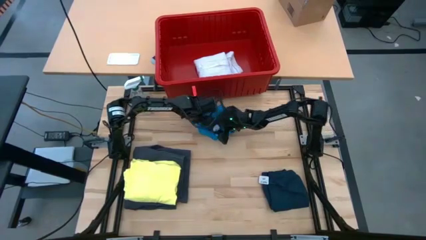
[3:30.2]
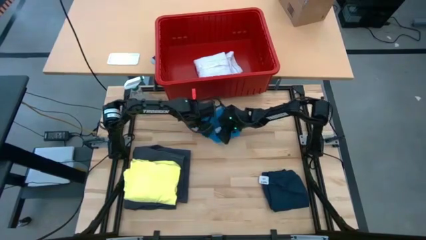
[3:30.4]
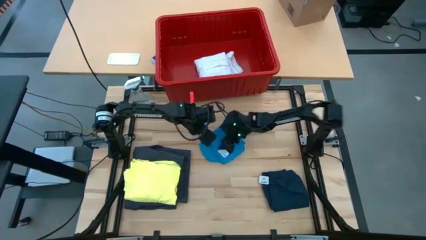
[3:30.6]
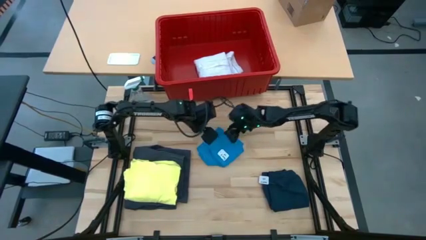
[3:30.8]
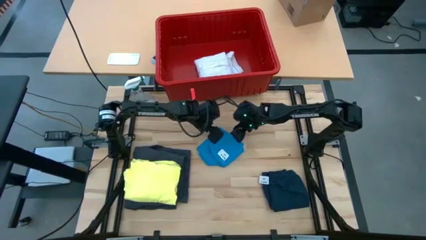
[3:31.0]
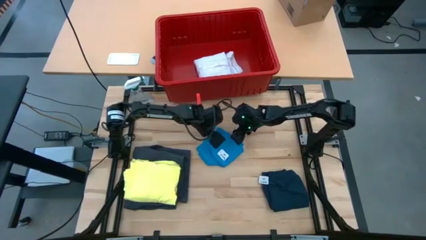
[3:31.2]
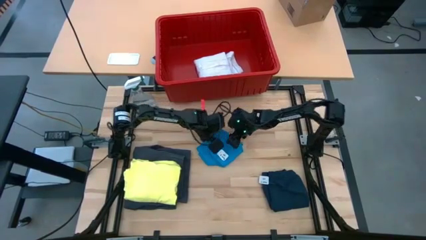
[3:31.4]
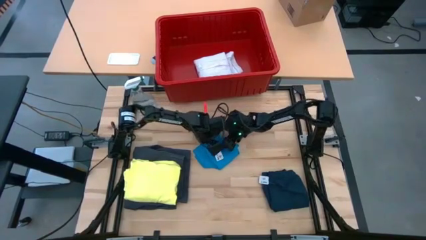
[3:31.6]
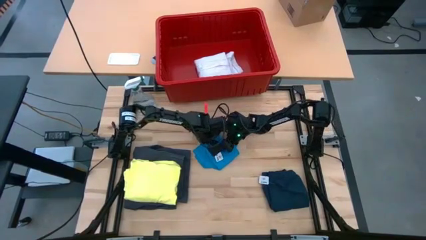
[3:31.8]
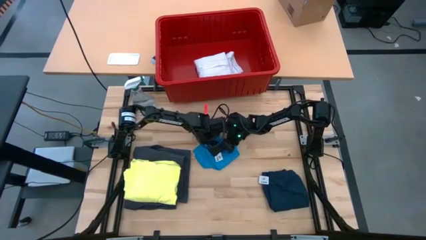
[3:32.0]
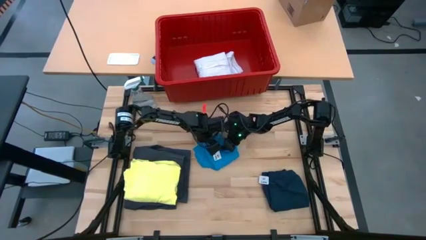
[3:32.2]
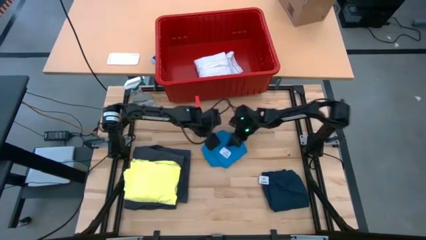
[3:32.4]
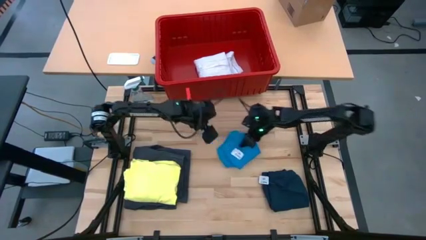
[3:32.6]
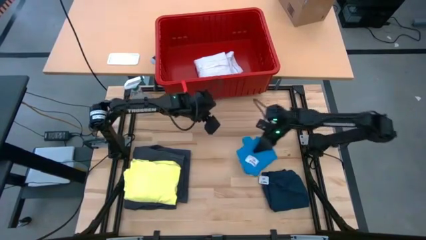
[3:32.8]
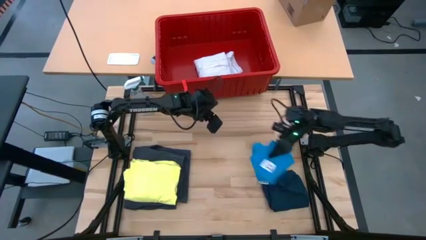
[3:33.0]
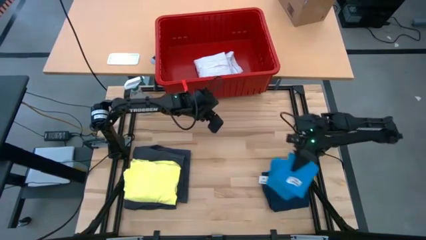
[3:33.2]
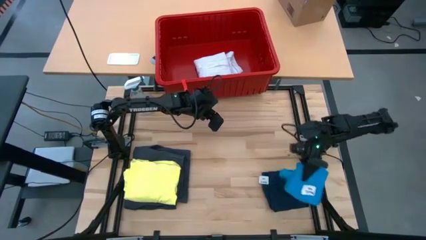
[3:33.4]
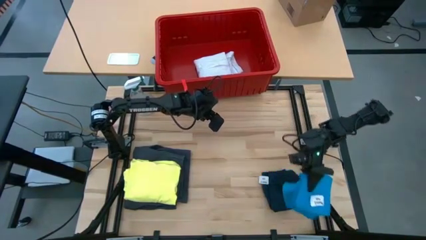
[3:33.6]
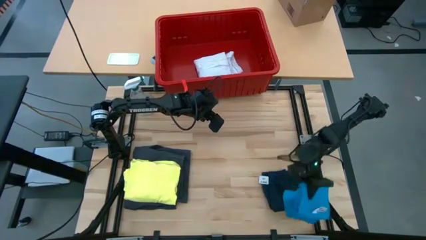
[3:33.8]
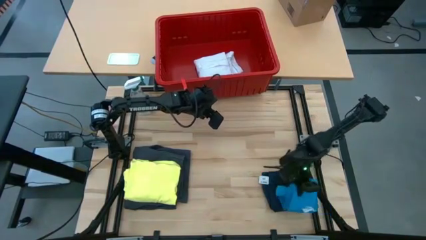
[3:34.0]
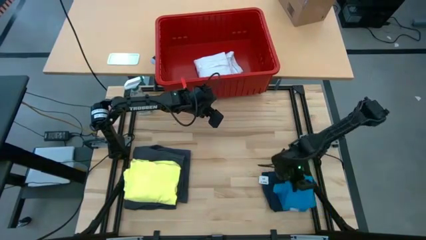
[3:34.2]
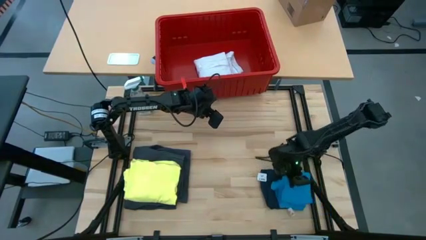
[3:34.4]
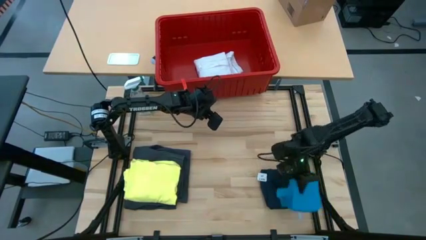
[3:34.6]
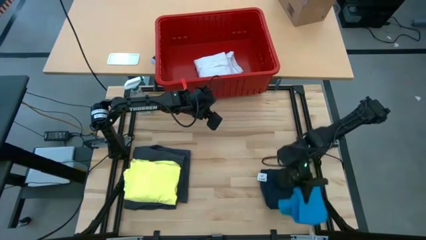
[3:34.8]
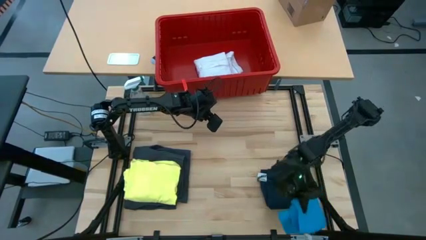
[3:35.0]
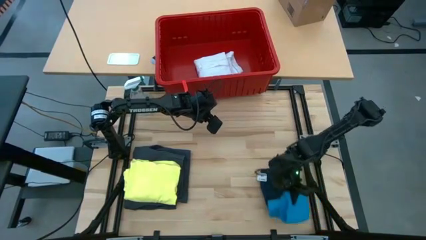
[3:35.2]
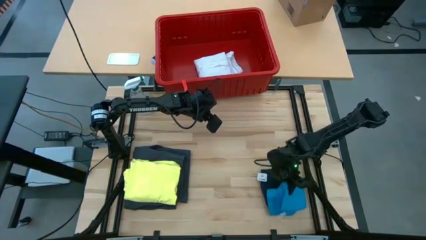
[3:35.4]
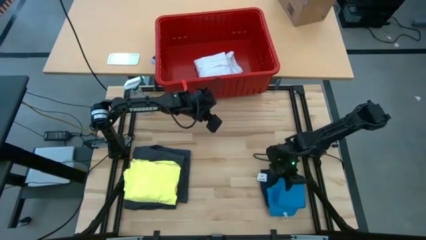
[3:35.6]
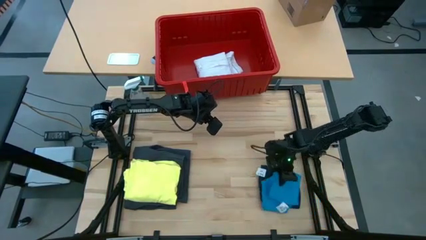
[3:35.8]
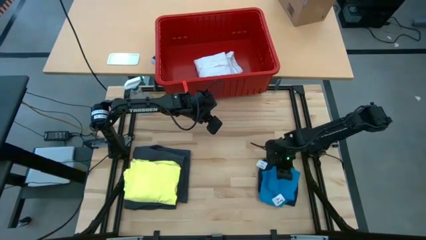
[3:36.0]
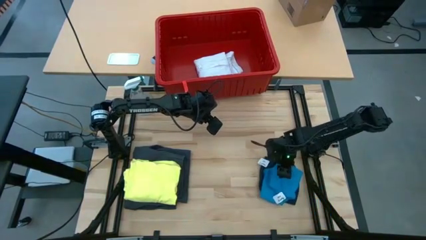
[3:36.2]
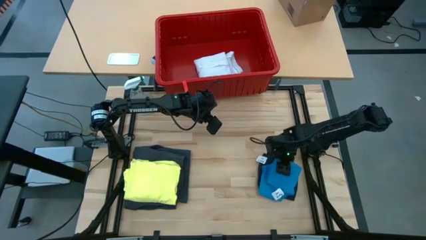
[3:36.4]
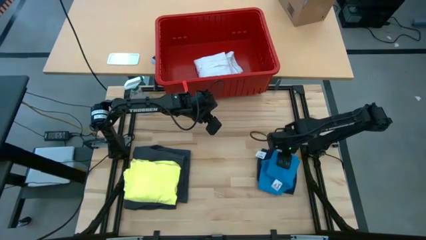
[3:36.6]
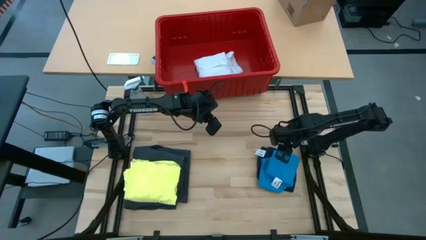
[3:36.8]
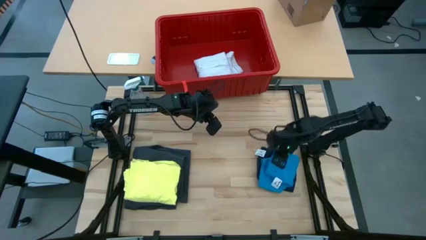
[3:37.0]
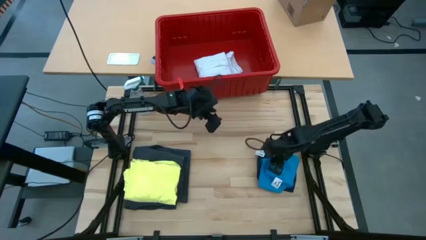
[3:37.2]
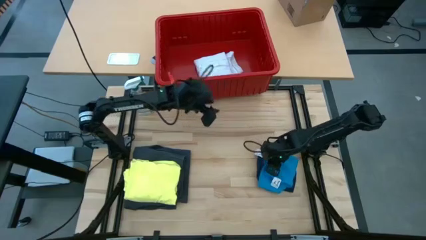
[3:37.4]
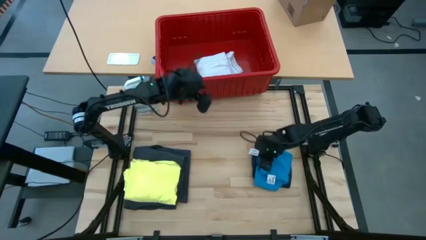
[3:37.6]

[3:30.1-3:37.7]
Task: Fold Laundry from Bin
Stack the light blue short on top of the dark blue short

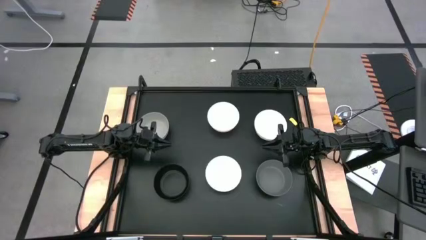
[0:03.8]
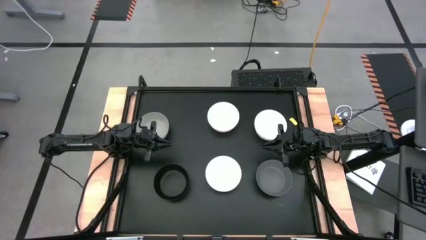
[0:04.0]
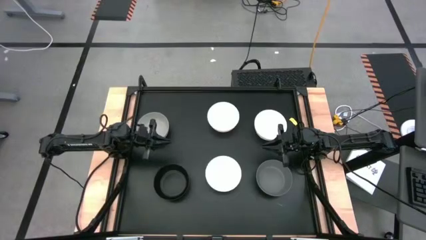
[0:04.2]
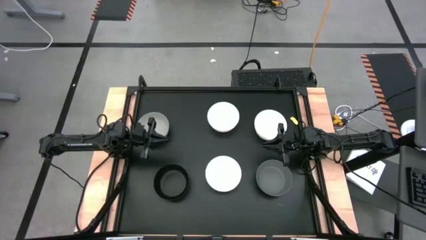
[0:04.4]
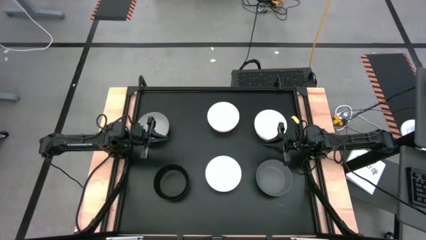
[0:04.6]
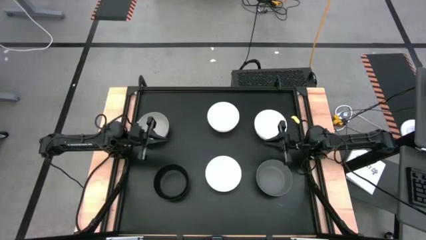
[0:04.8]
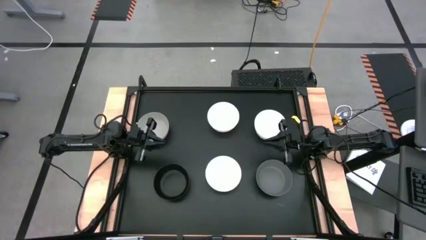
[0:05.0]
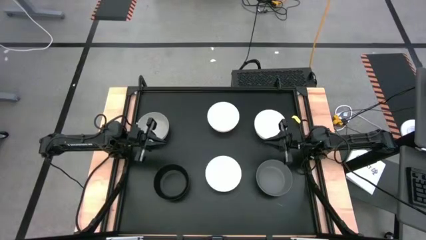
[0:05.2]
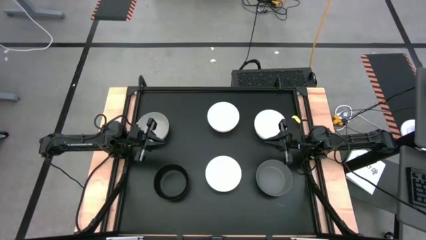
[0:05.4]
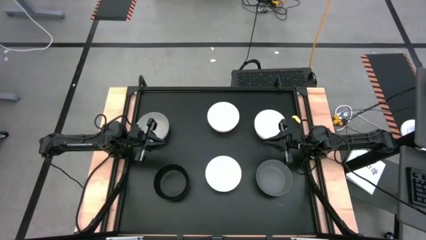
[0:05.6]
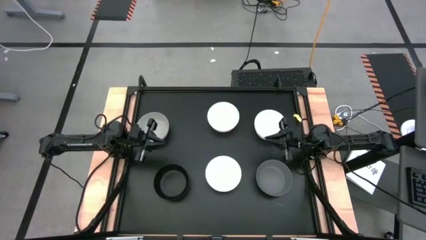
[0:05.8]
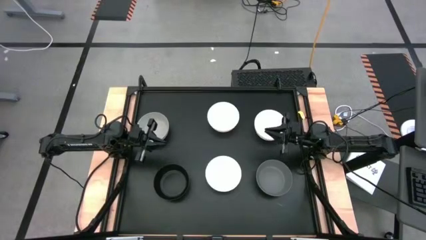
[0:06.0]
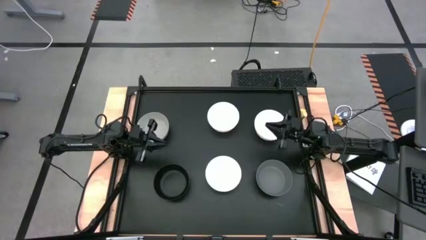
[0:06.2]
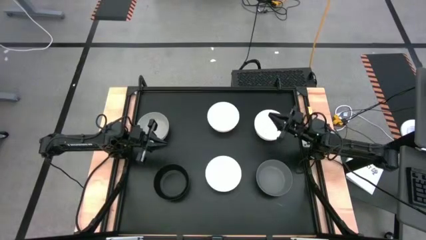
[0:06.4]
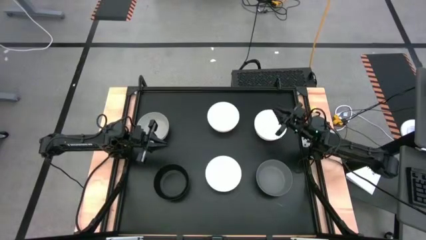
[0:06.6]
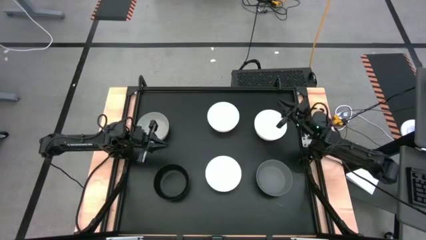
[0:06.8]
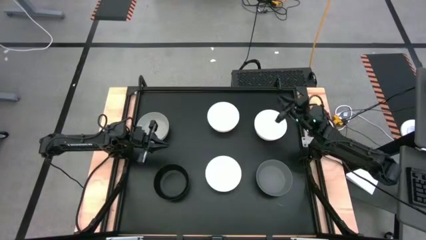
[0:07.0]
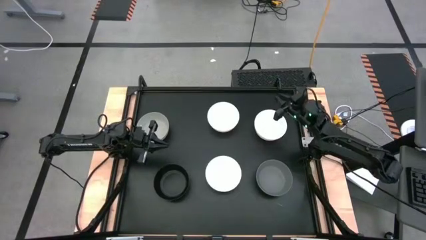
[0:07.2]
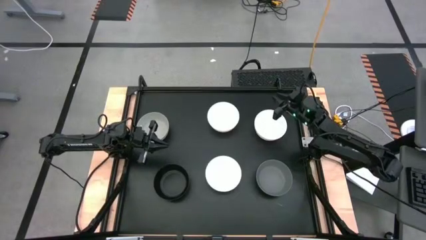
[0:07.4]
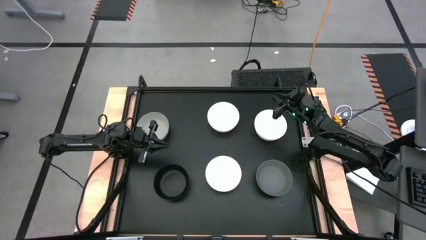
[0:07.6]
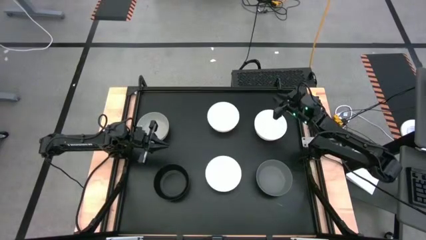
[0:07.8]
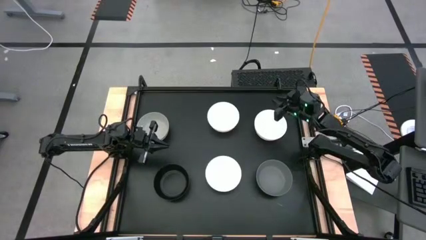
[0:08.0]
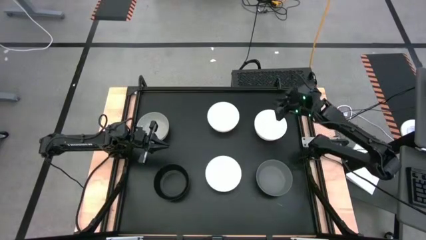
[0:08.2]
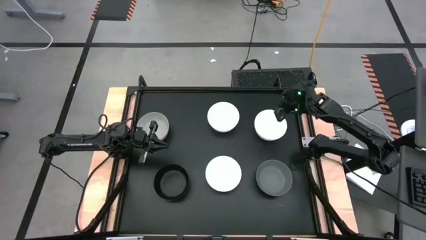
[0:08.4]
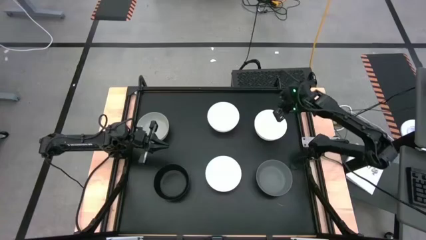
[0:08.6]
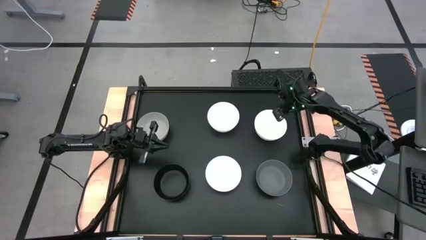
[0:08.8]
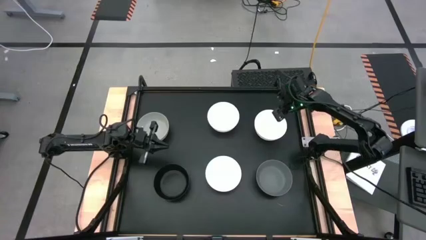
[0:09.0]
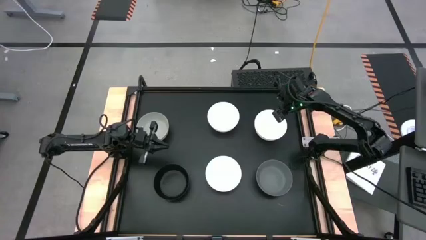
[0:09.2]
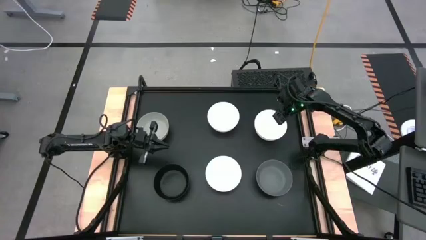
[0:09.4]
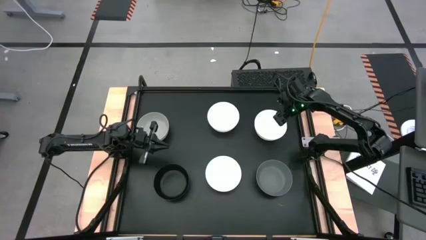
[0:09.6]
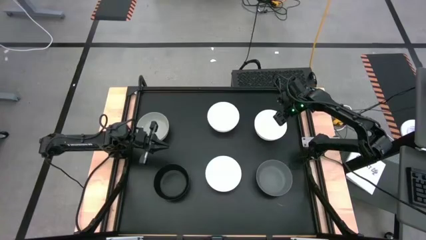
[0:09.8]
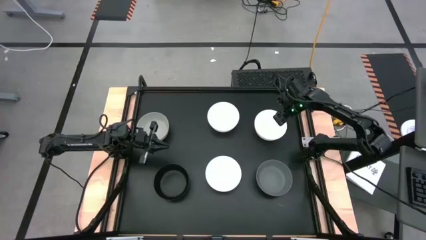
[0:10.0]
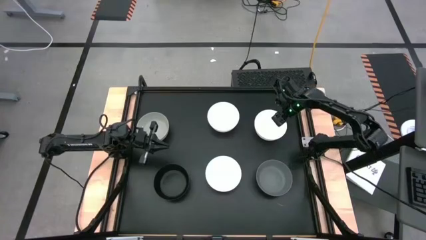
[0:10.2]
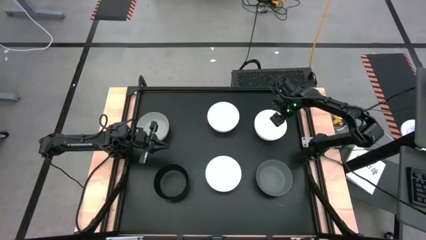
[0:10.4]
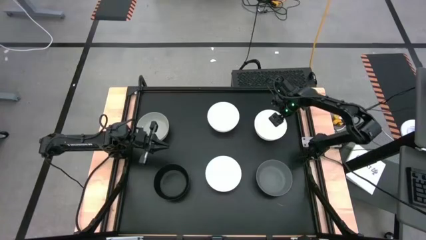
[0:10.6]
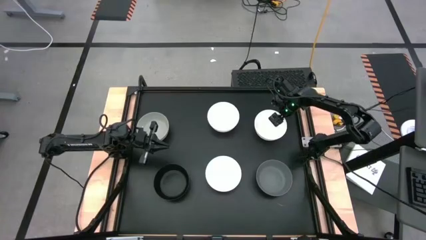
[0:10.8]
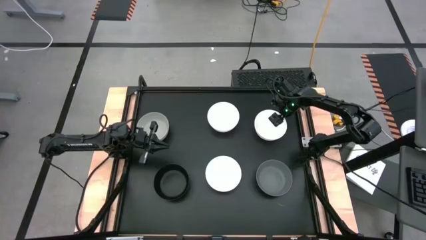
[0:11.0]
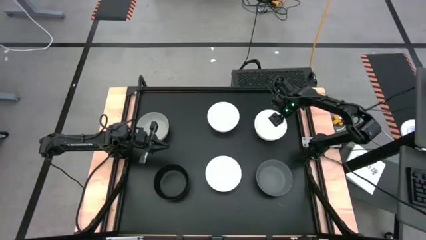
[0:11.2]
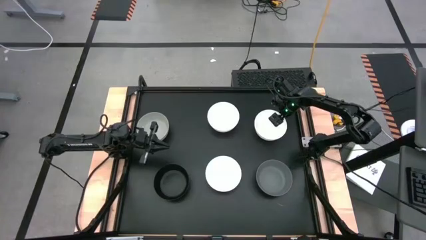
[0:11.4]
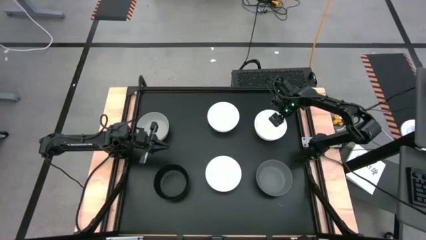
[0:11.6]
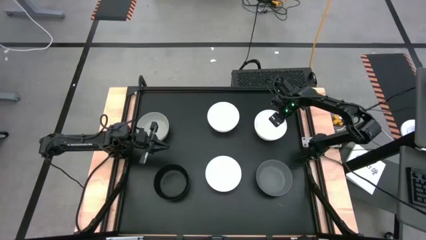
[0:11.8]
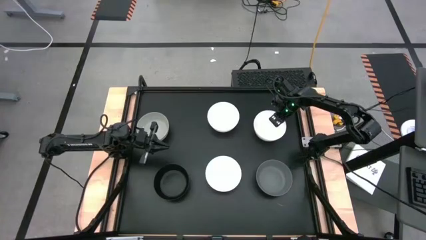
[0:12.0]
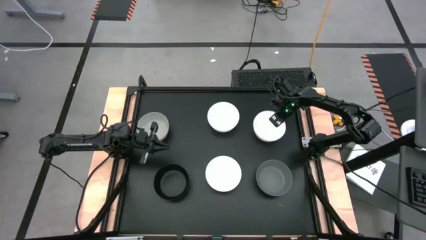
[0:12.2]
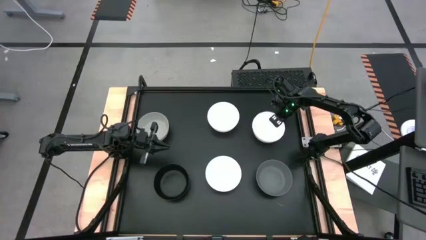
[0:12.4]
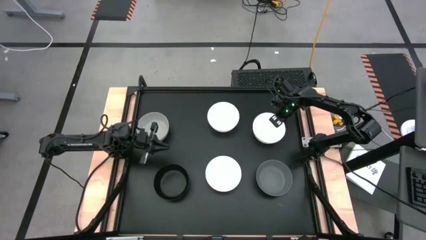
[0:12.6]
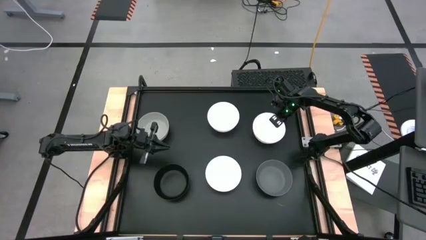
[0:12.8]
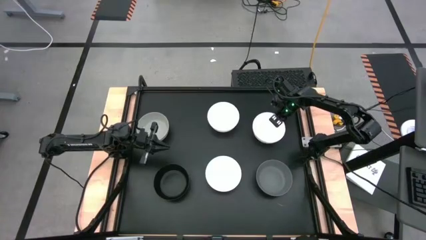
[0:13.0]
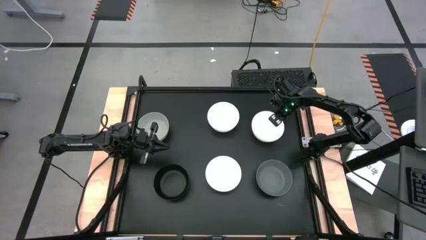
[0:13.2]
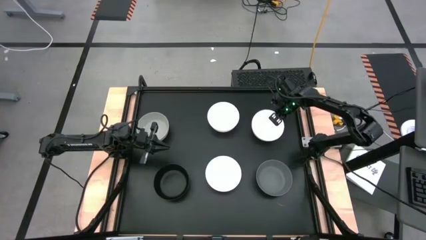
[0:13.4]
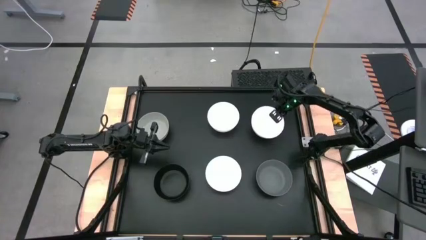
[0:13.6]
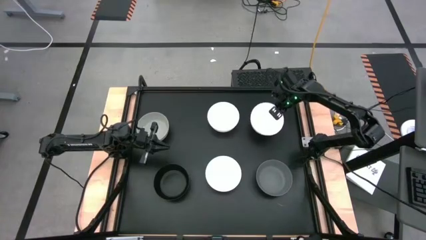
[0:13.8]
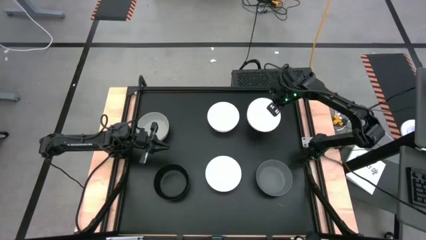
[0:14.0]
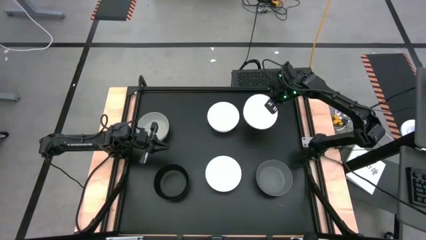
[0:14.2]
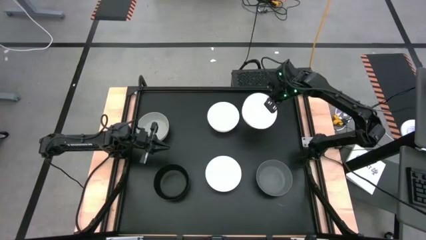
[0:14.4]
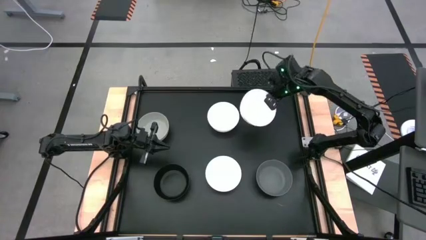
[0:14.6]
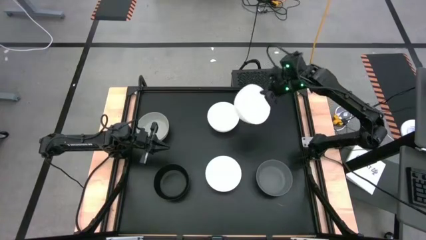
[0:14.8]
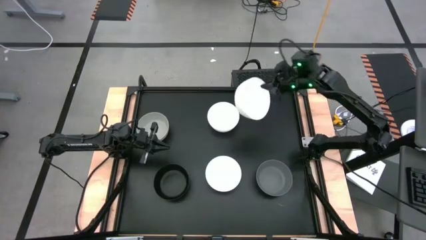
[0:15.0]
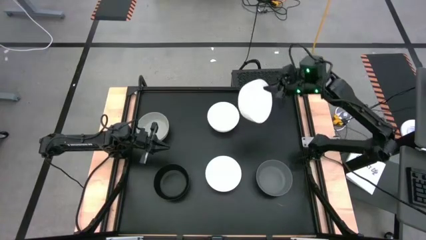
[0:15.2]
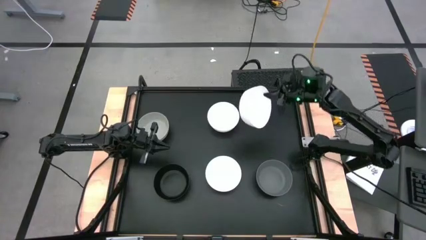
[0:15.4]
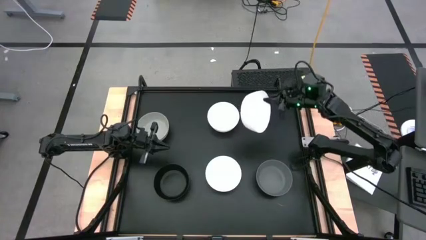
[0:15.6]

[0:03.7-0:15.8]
Task: Nest bowls inside each other
Stack the top right white bowl on the top middle white bowl
